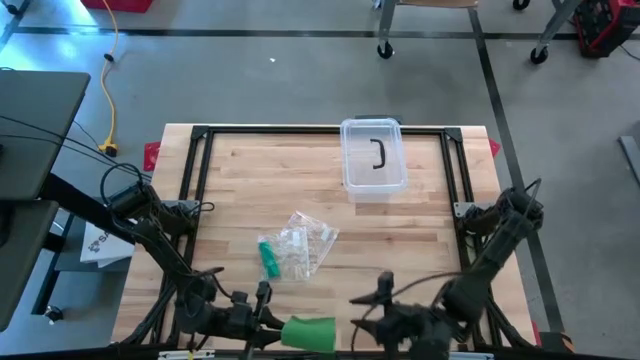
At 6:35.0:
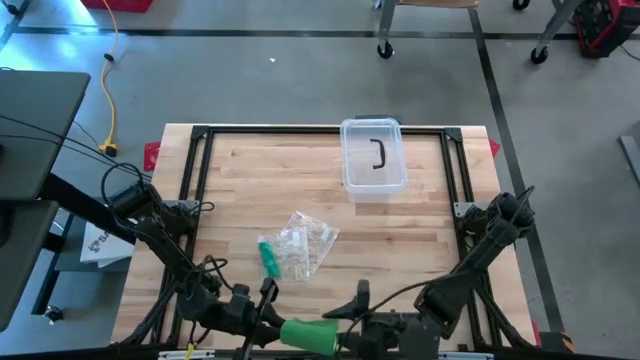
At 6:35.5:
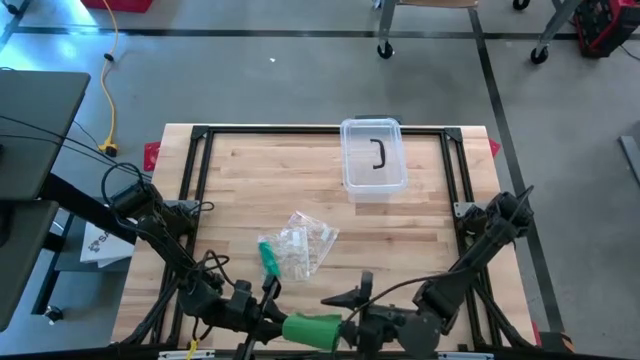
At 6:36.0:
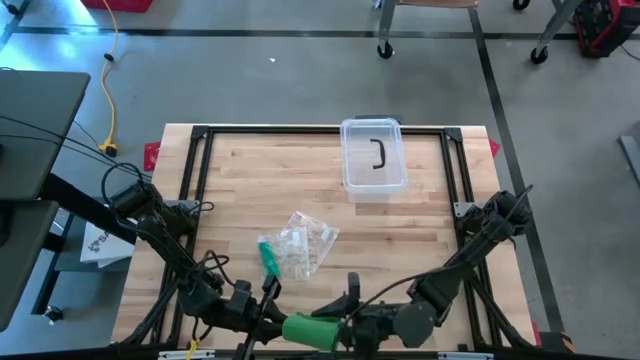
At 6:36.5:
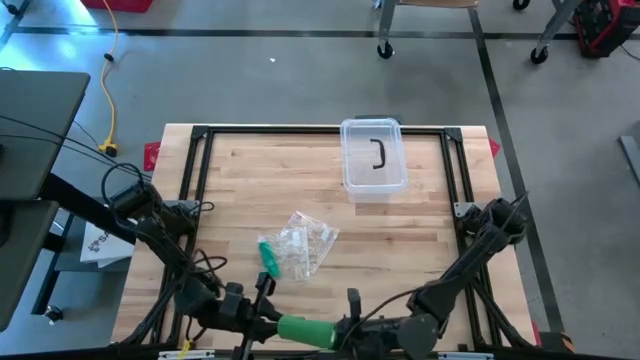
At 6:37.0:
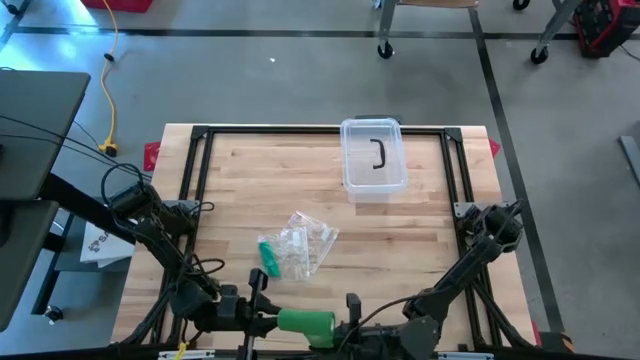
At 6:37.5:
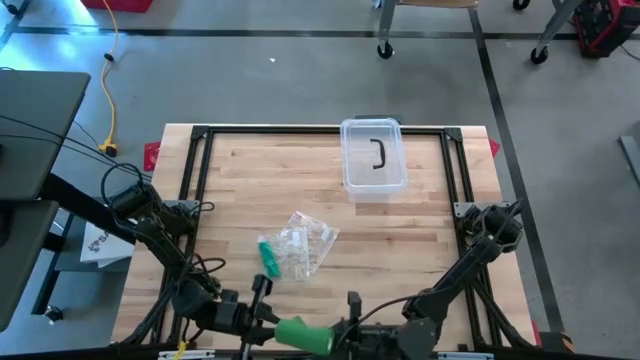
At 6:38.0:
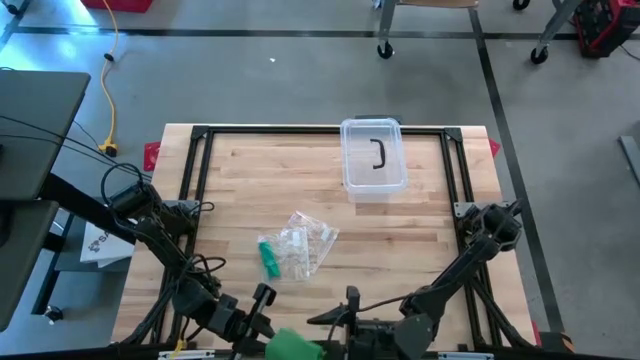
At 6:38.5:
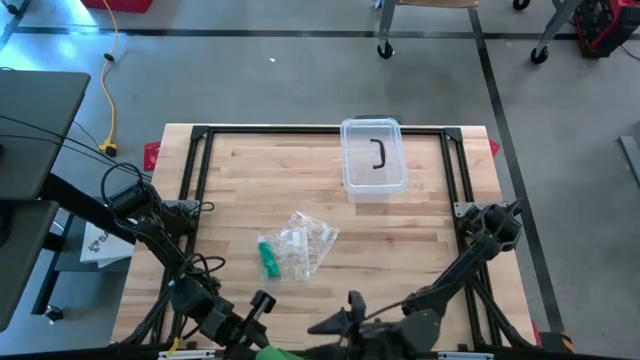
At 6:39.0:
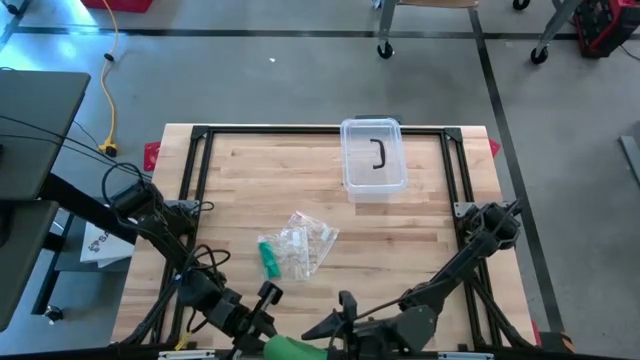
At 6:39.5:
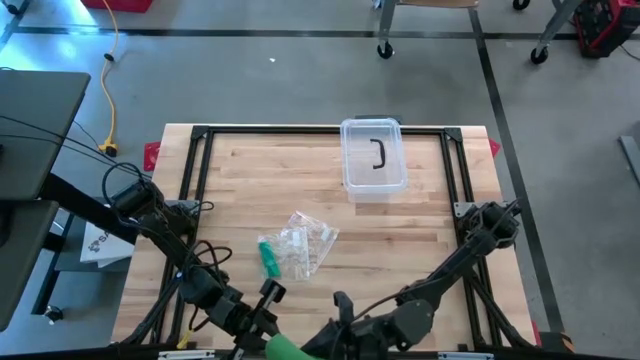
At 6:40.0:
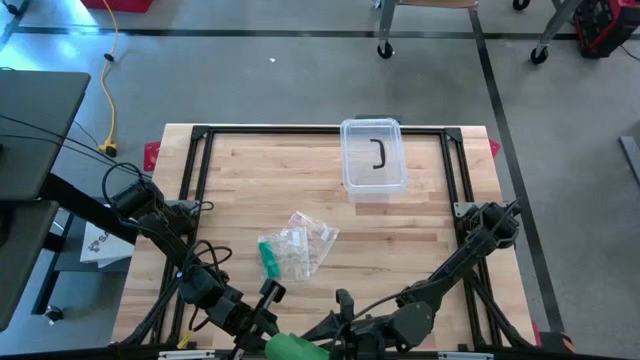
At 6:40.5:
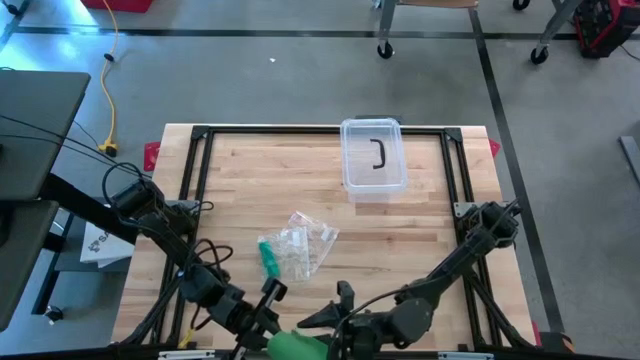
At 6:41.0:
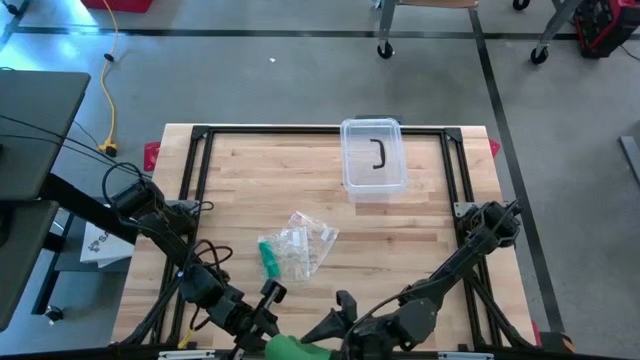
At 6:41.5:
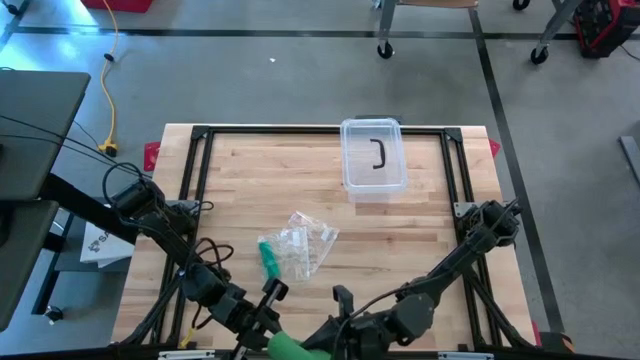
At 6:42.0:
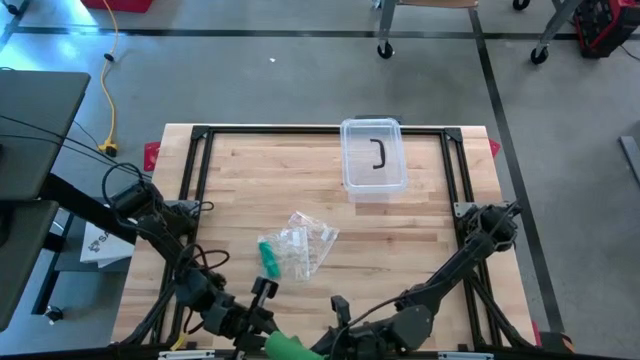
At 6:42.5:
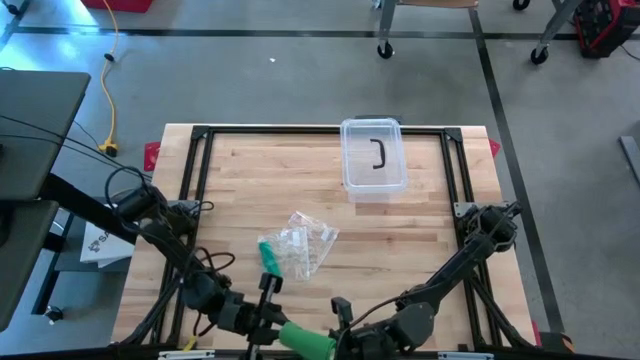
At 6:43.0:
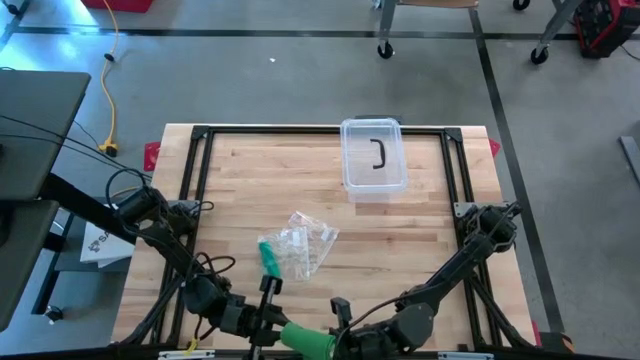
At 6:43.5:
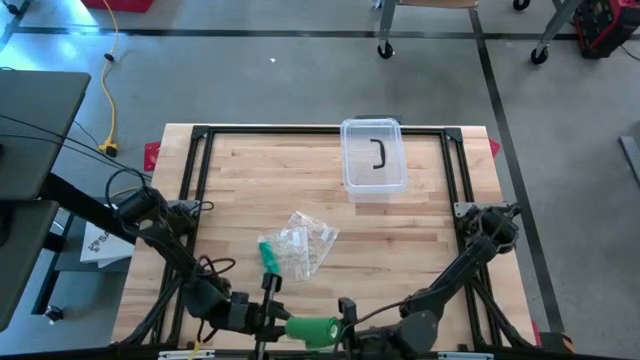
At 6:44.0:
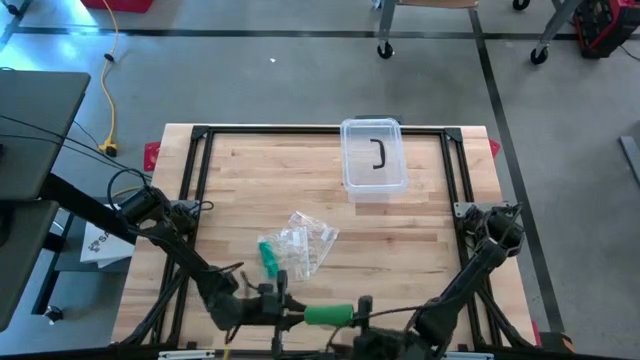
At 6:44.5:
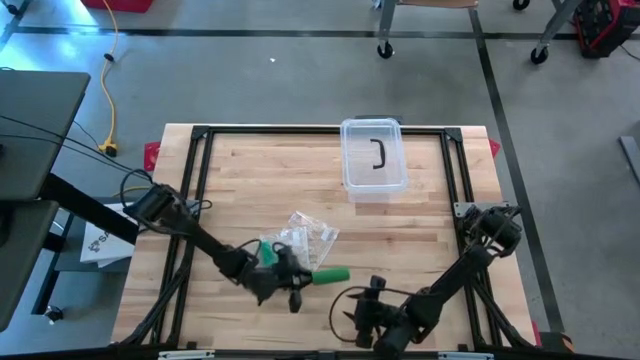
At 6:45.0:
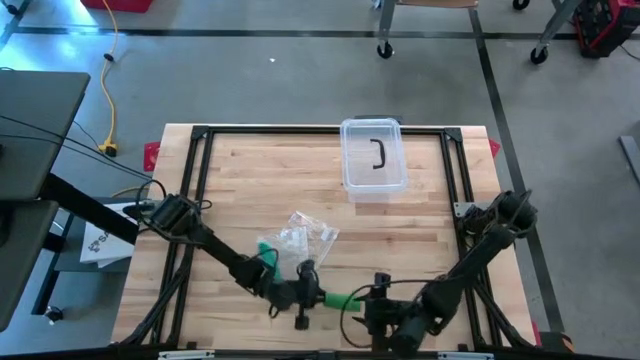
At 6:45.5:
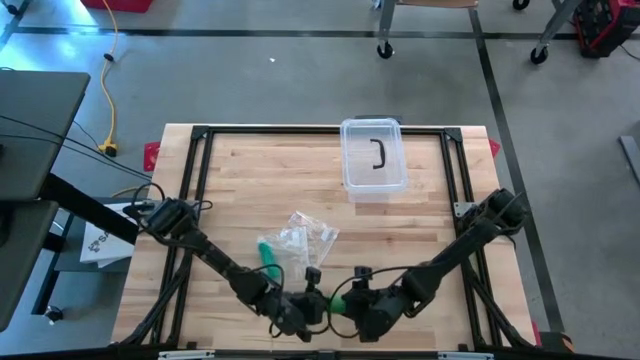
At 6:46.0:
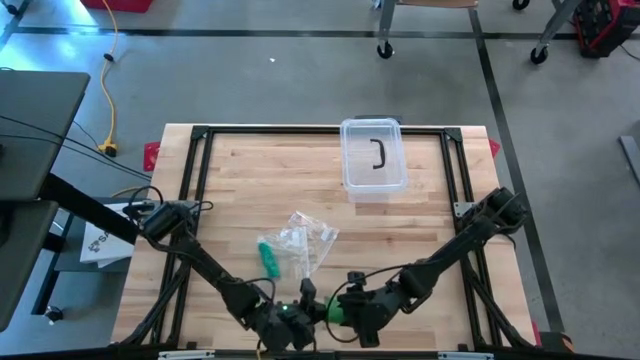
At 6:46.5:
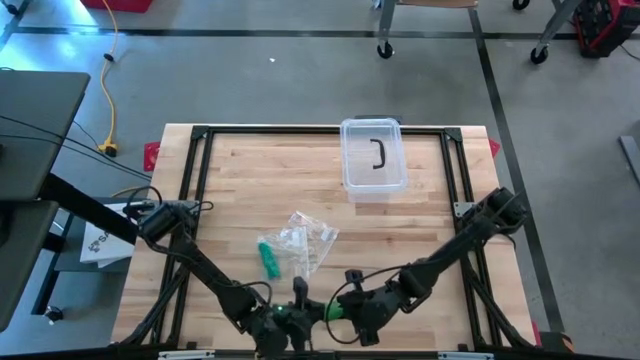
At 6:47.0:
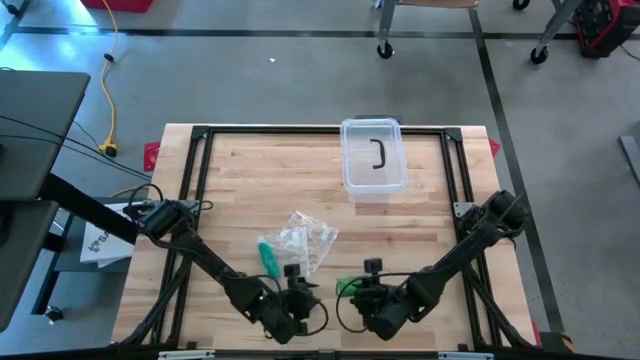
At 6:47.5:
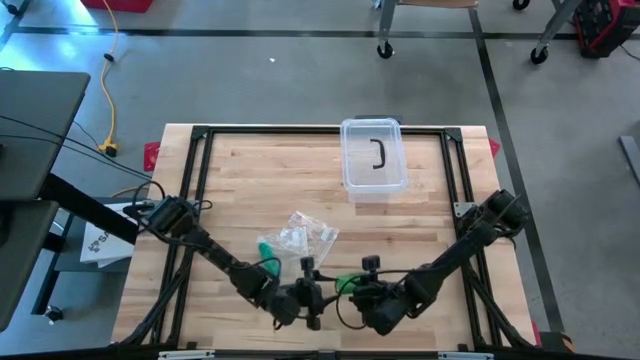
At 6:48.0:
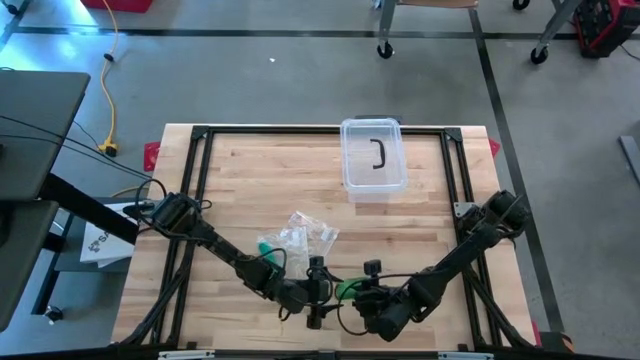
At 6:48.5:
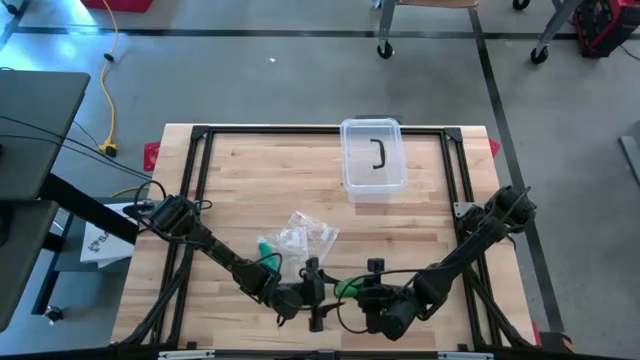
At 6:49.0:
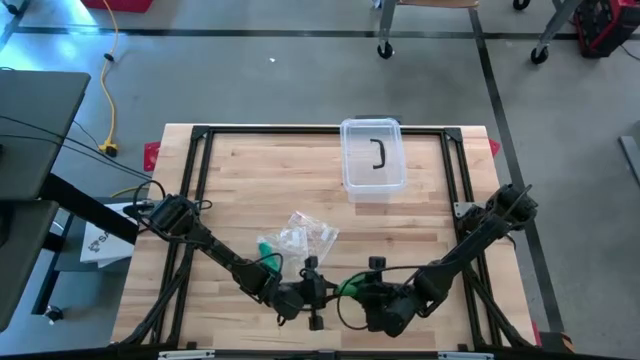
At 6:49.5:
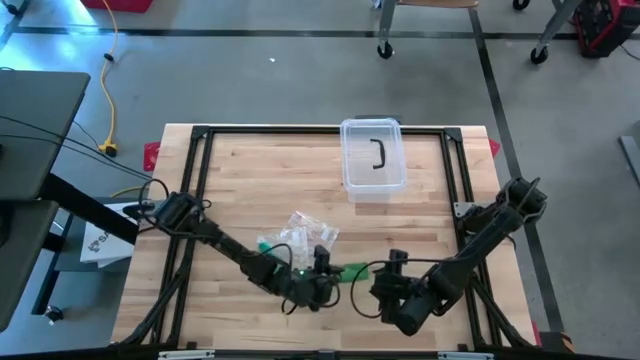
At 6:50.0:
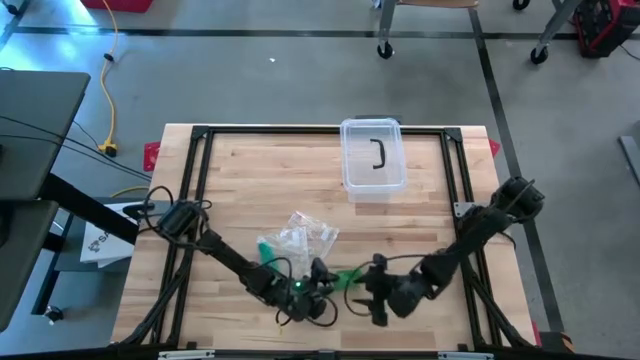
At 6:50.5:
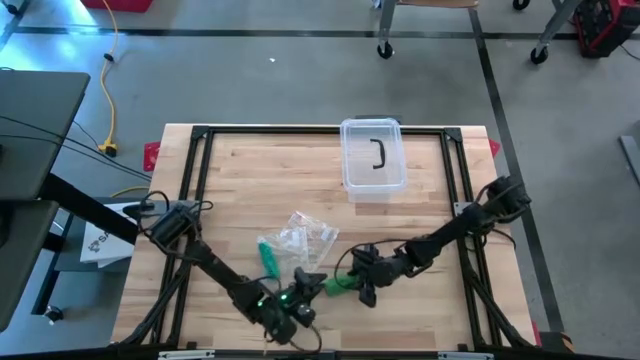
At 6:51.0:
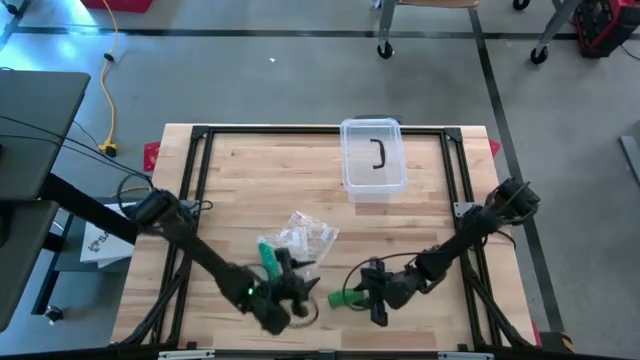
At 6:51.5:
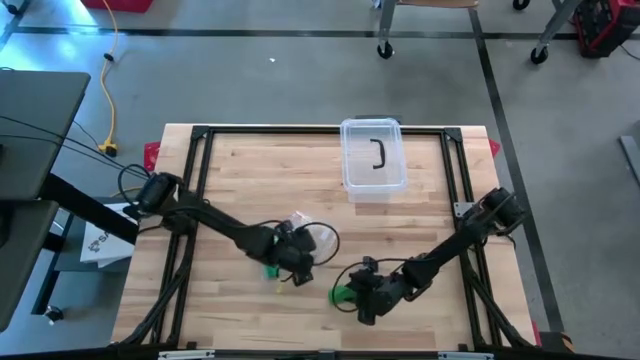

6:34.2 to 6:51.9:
Task: Roll bandage
Roll the green bandage
